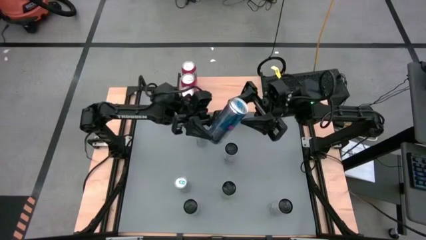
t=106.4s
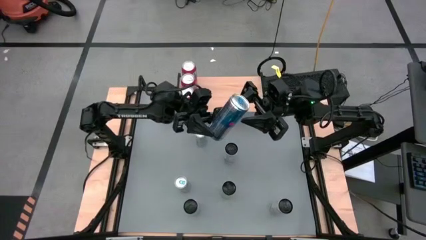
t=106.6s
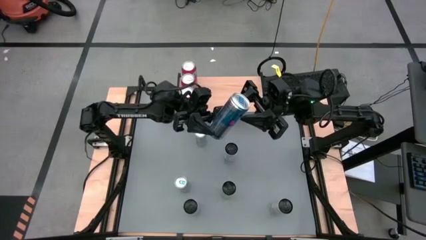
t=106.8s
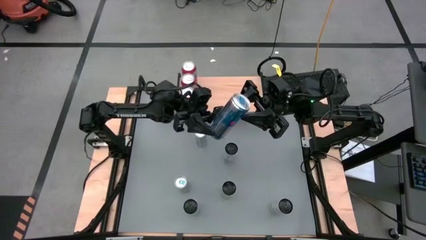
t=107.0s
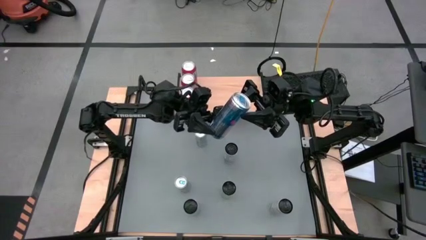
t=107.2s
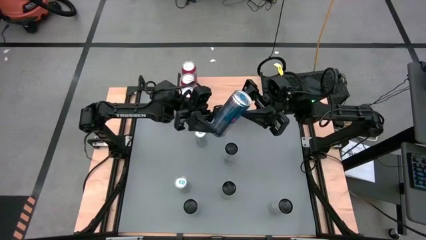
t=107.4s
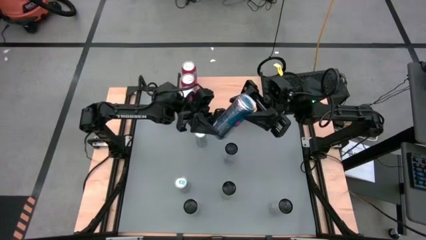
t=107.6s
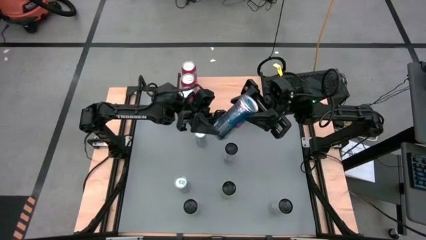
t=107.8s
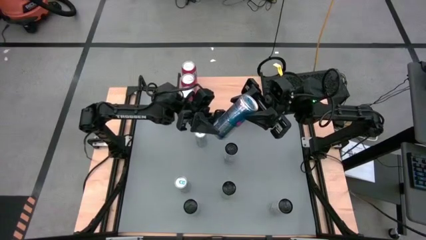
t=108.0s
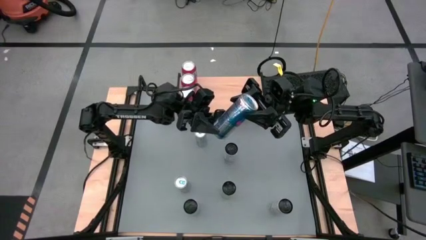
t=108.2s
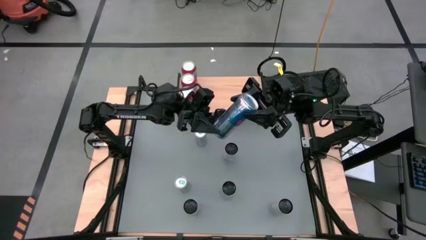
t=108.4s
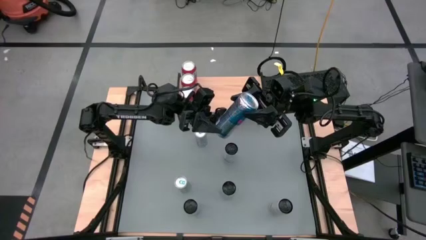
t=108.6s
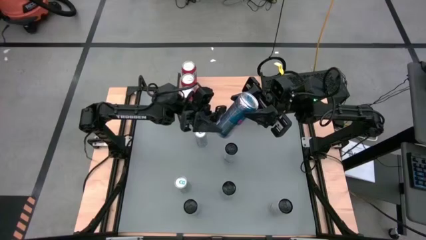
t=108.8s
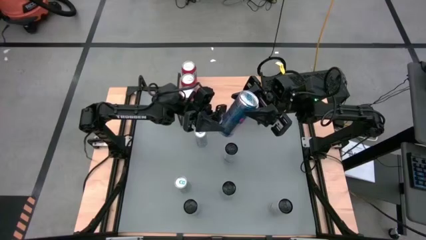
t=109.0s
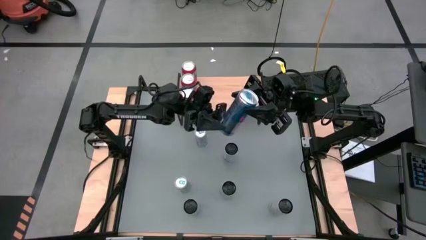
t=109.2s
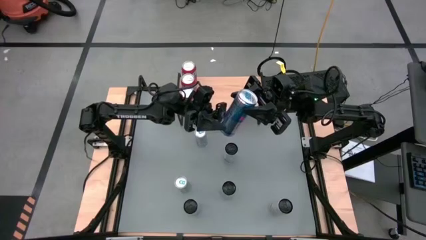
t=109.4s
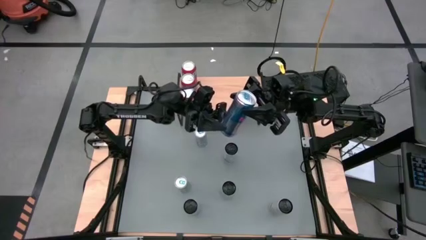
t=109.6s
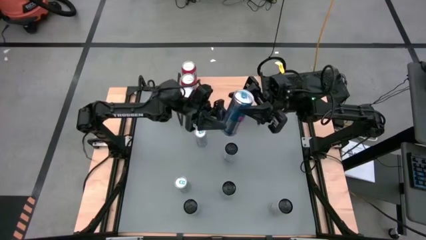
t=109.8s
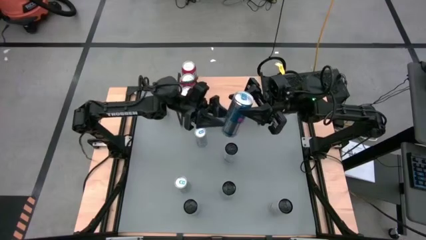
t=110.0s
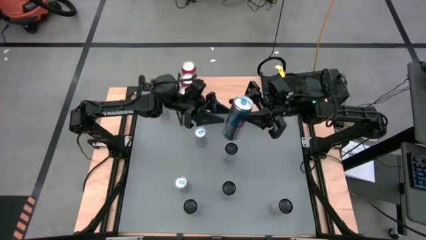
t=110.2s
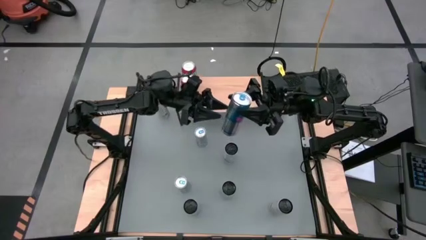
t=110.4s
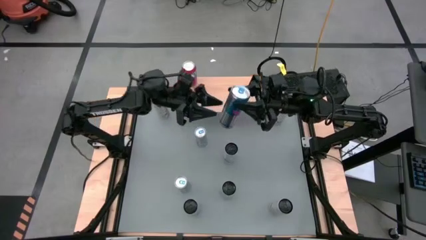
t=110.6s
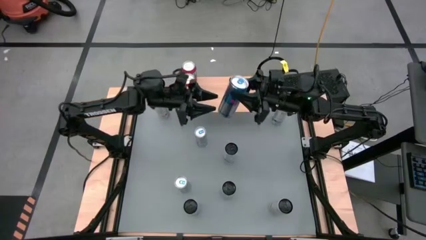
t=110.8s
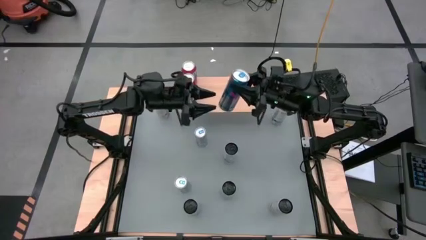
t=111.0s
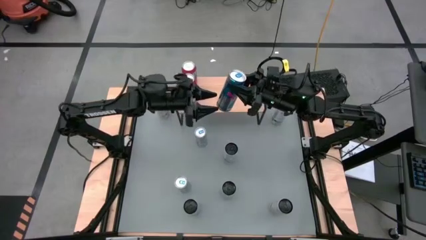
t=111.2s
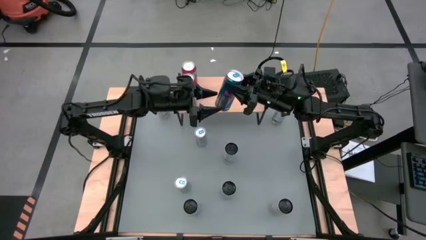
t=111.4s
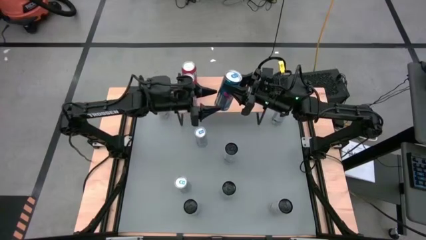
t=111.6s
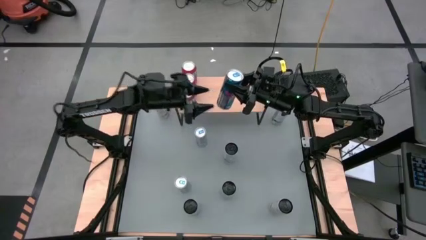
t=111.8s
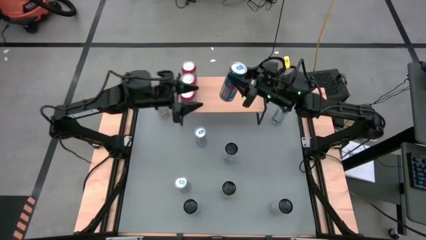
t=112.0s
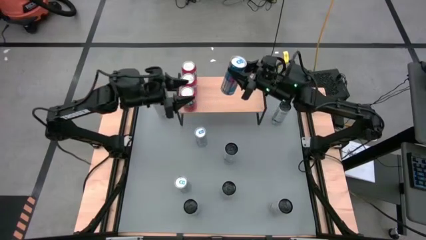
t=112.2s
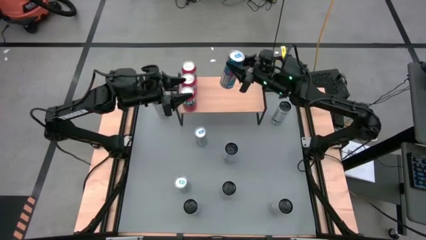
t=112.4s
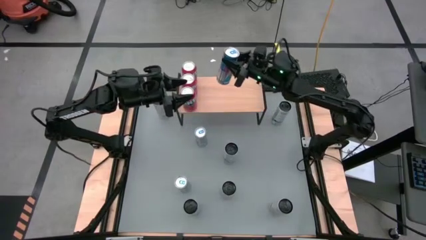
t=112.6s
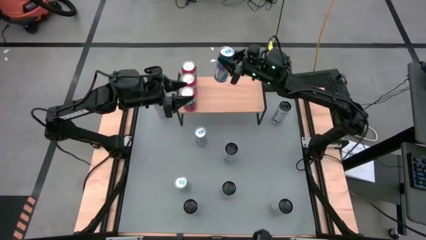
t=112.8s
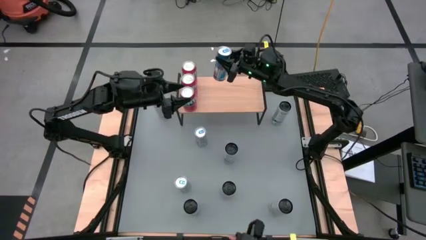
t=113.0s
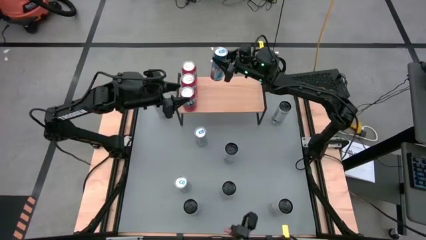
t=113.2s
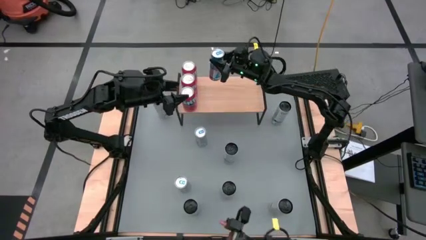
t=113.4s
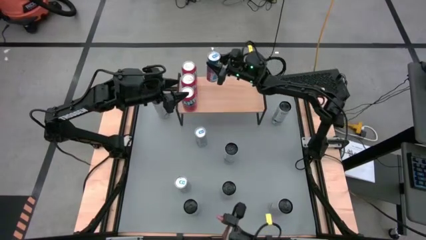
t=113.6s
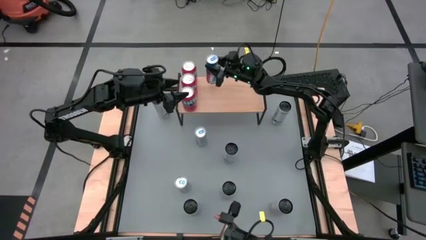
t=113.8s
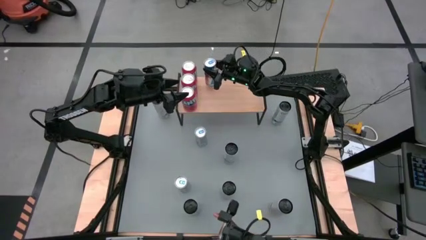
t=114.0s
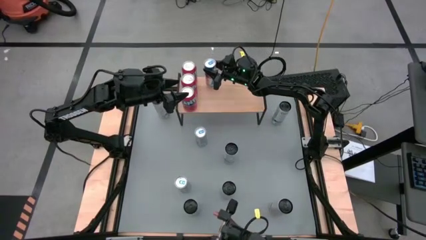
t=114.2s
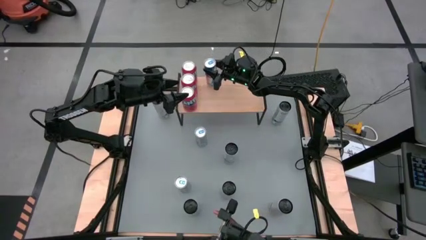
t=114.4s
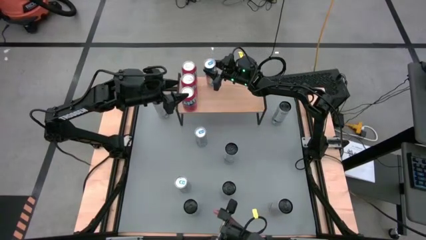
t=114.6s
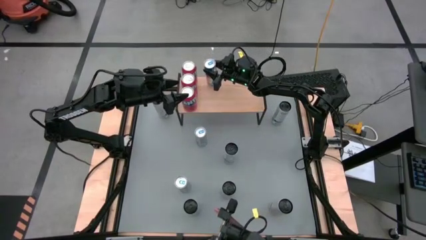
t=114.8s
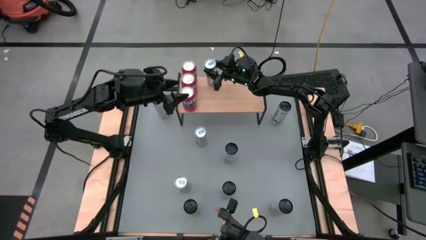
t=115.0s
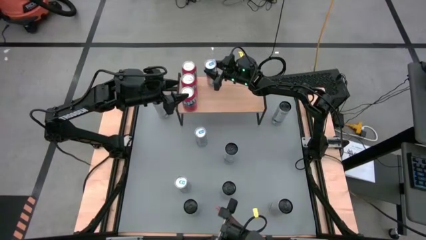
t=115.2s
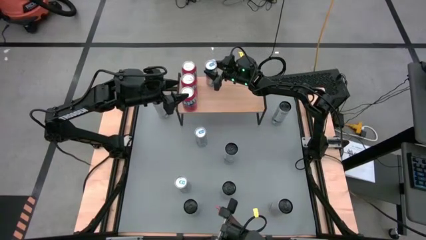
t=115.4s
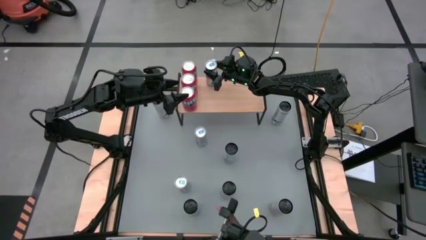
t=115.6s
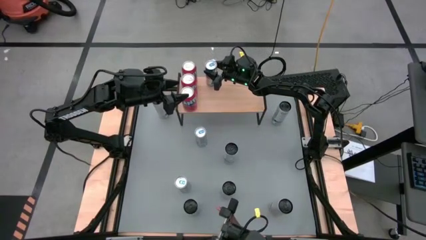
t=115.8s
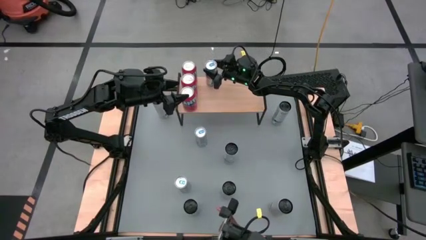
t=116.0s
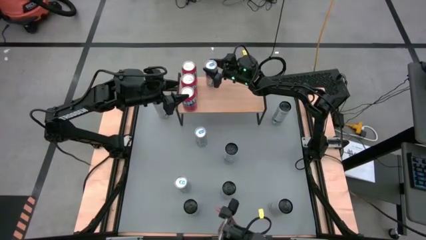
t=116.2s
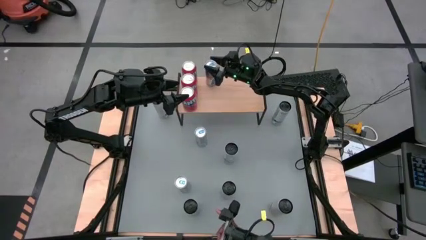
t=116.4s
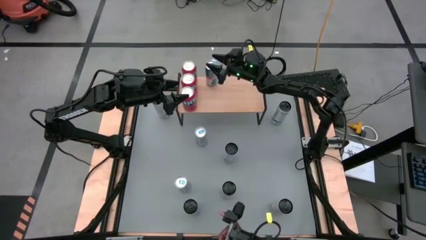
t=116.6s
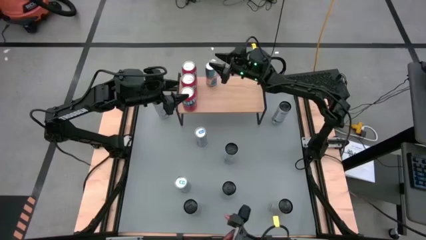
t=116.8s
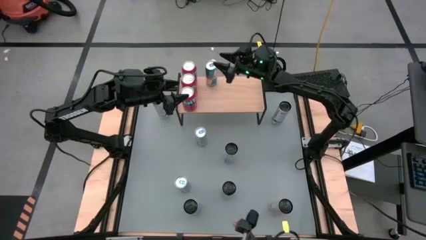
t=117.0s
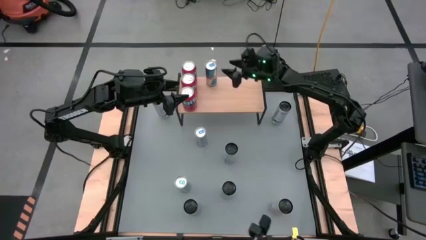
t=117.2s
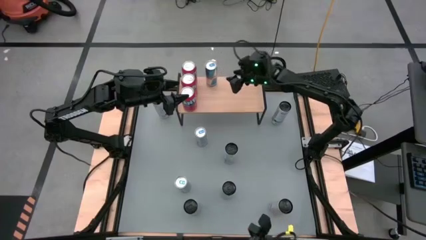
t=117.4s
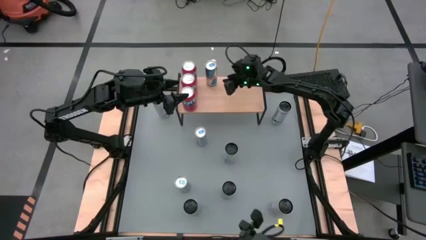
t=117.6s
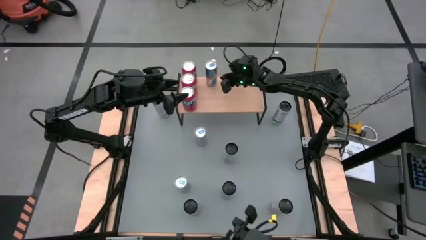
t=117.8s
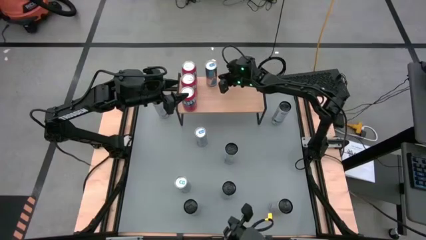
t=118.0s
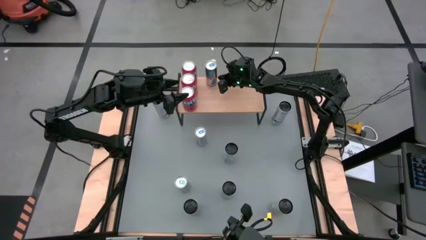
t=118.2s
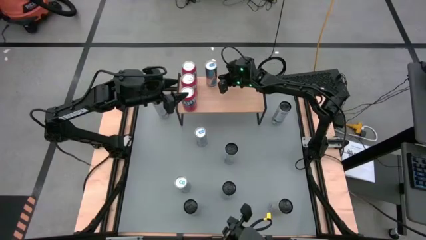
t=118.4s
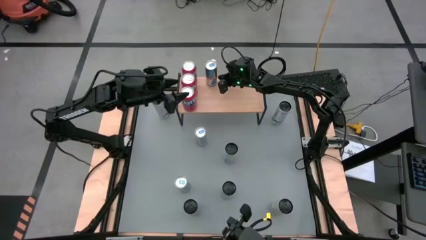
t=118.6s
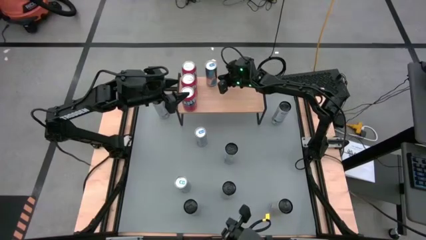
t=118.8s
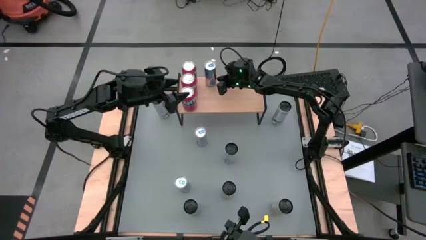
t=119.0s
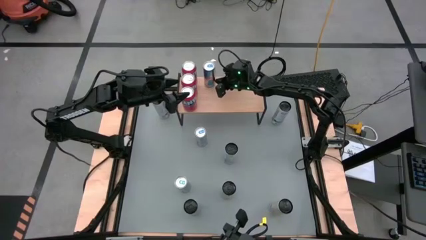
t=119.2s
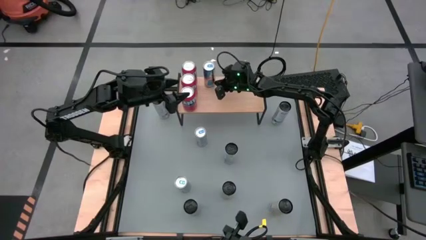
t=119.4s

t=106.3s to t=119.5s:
Task: Place canned beverage on shelf
Put the top right blue soda can on the shelf

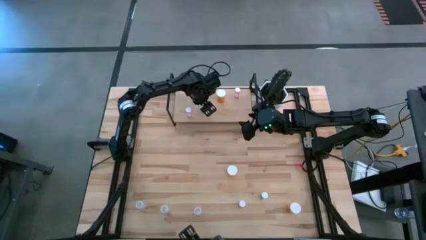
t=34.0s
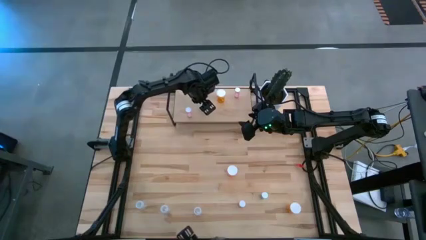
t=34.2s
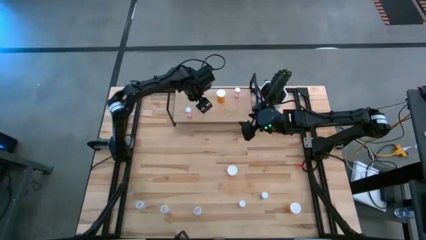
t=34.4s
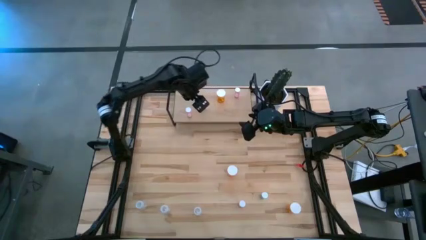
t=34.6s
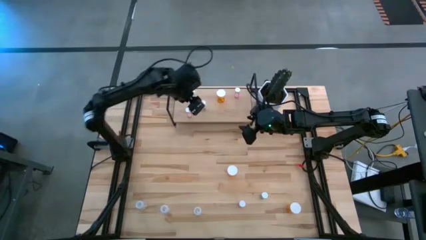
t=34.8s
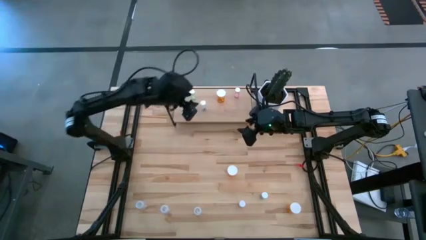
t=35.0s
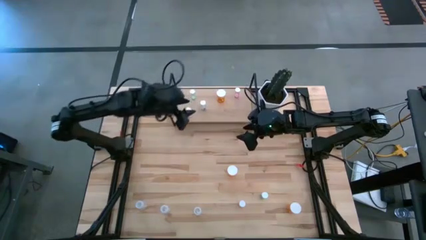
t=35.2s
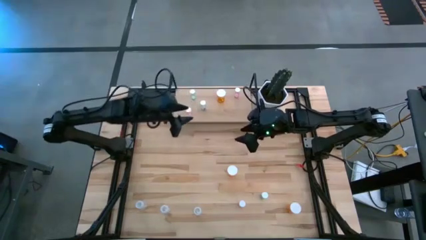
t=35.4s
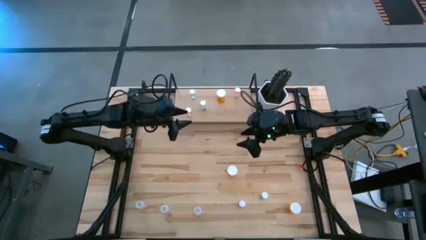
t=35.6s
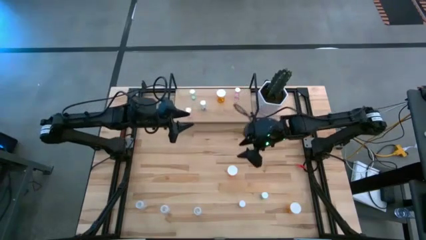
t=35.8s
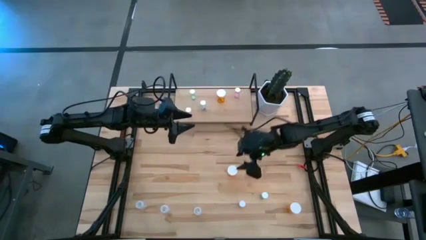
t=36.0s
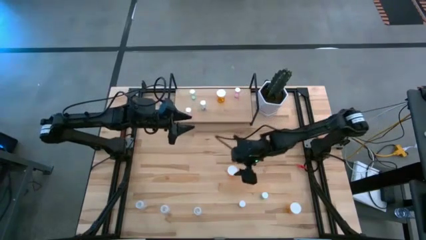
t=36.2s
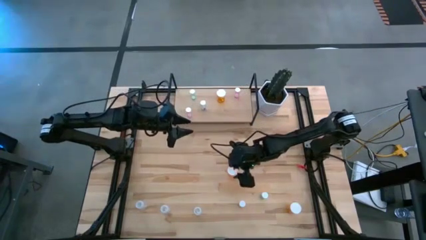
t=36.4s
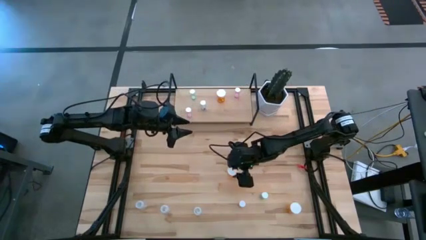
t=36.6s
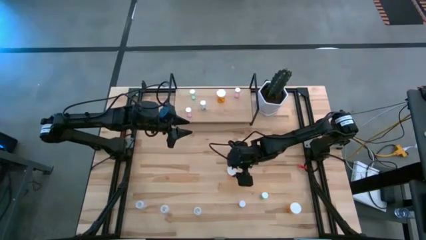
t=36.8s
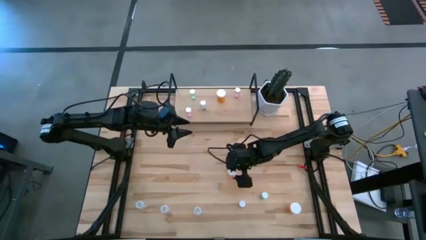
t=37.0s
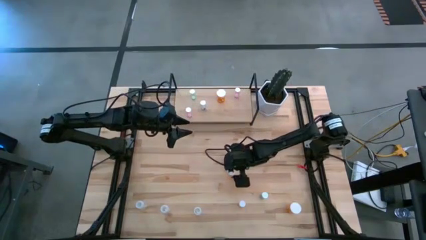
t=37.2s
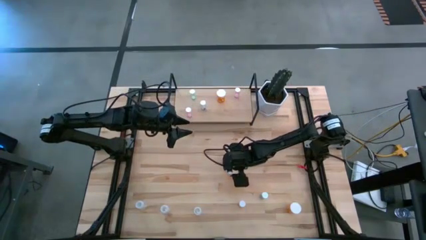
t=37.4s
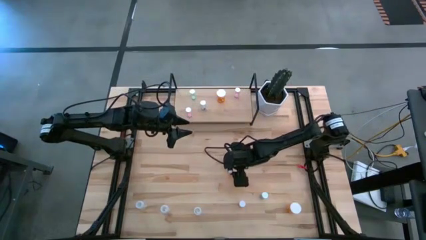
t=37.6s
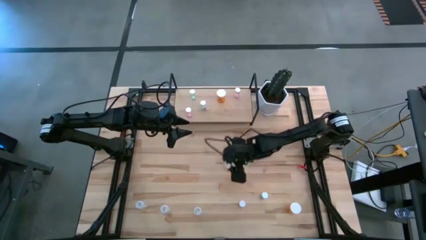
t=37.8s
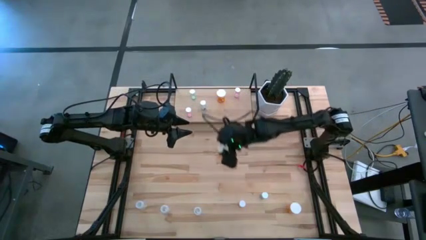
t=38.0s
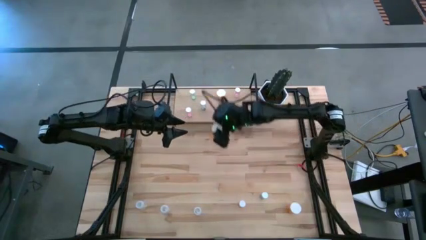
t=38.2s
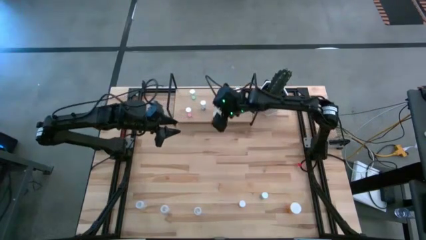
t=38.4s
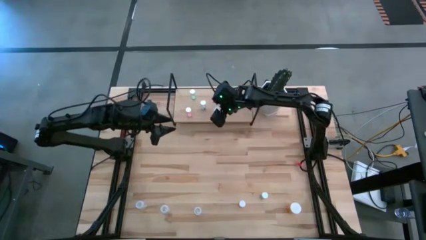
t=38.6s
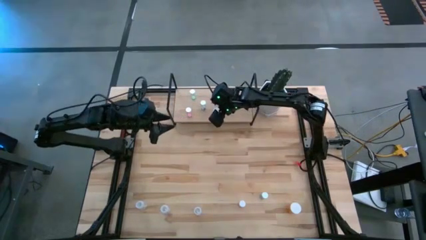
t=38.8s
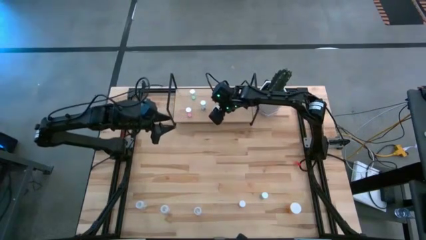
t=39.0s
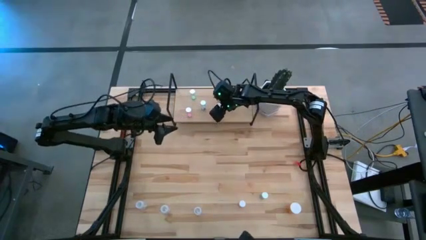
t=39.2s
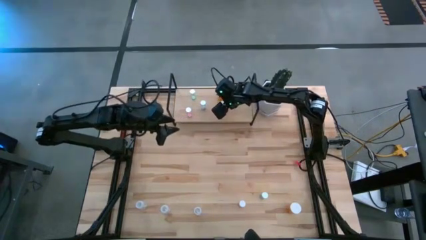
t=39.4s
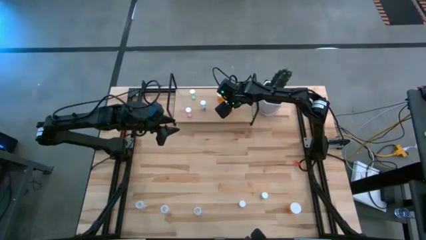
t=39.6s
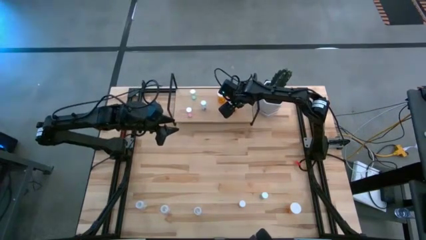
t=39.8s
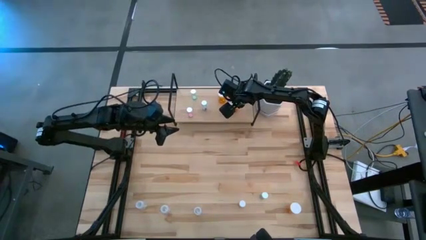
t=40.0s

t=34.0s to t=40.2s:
Task: Pick and place medicine bottles onto shelf by color
Put the left orange pill bottle on the shelf
